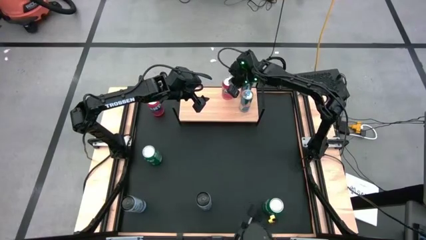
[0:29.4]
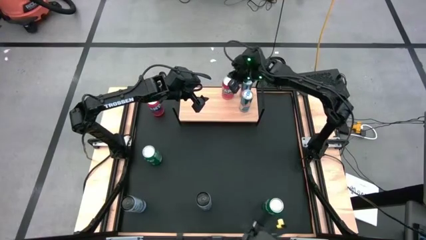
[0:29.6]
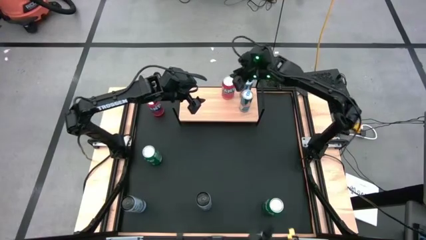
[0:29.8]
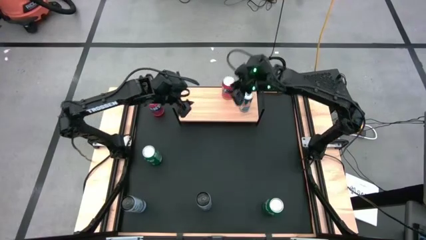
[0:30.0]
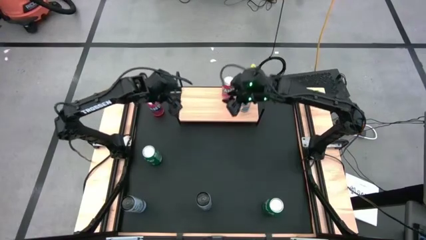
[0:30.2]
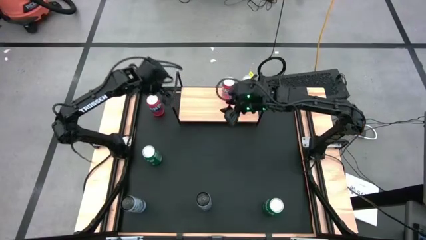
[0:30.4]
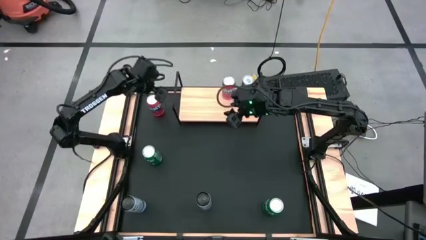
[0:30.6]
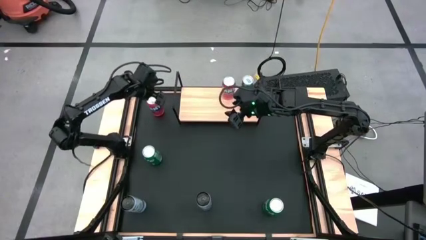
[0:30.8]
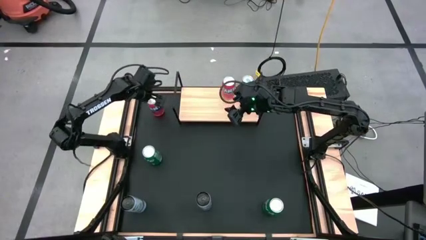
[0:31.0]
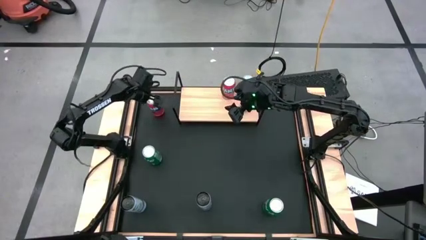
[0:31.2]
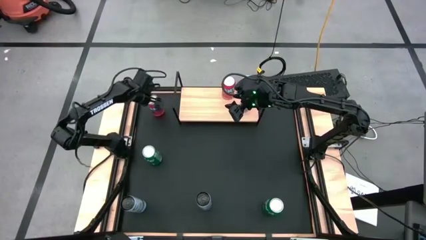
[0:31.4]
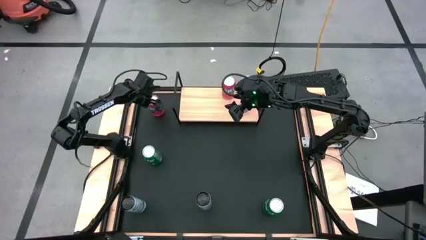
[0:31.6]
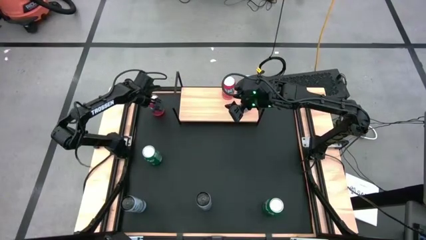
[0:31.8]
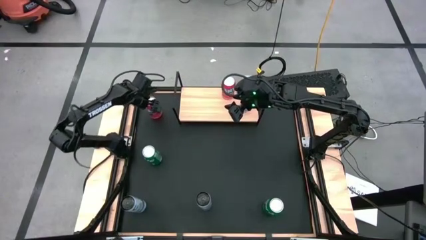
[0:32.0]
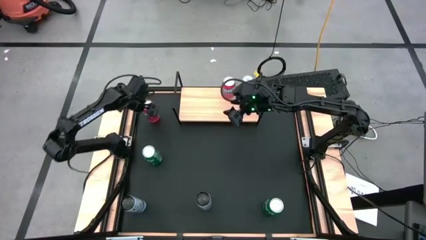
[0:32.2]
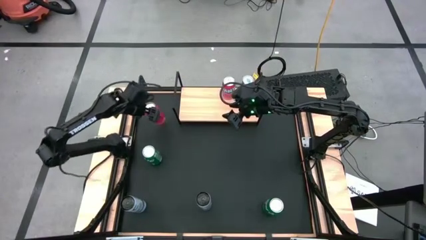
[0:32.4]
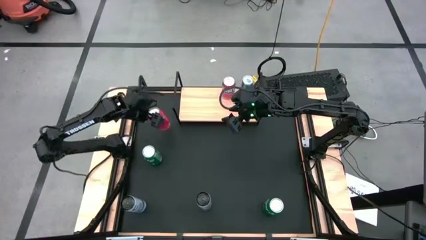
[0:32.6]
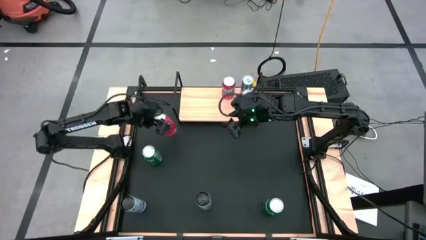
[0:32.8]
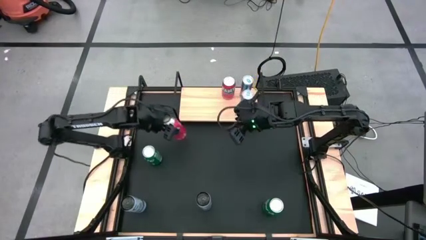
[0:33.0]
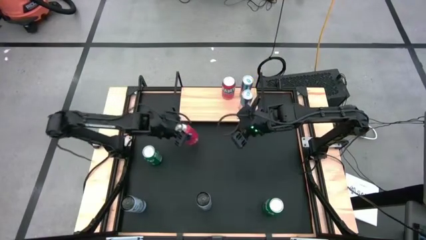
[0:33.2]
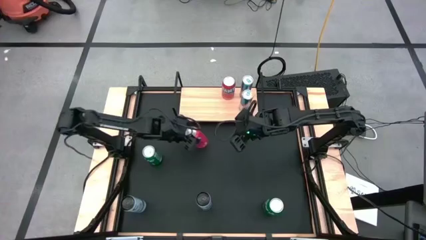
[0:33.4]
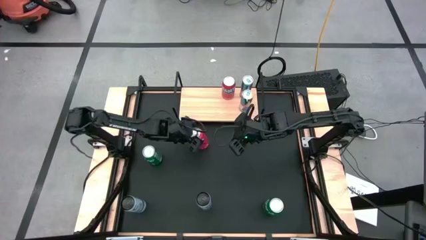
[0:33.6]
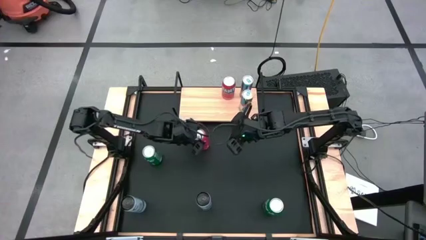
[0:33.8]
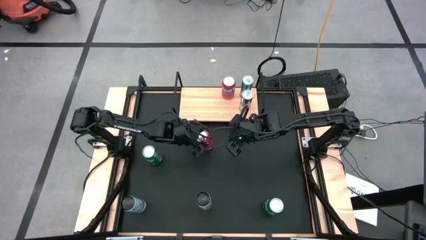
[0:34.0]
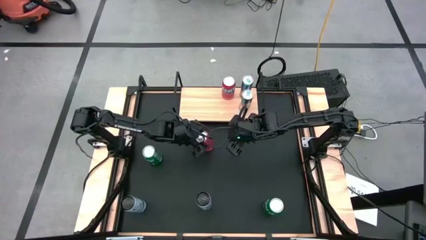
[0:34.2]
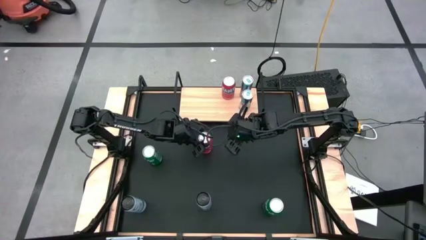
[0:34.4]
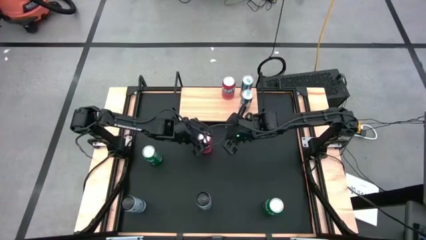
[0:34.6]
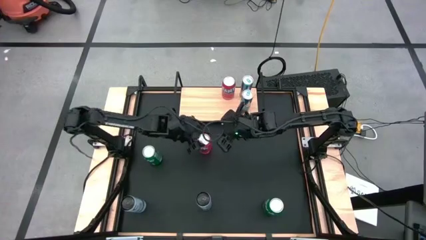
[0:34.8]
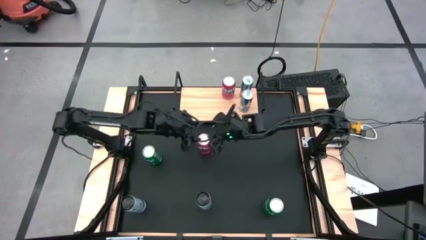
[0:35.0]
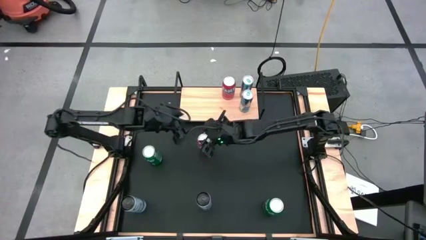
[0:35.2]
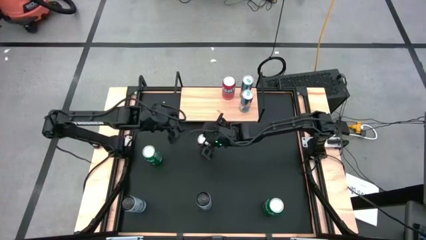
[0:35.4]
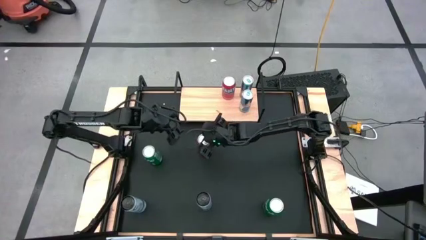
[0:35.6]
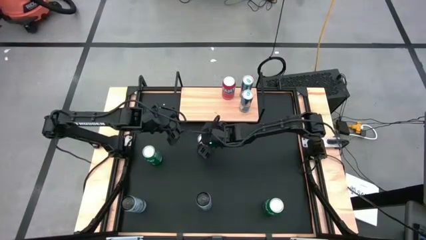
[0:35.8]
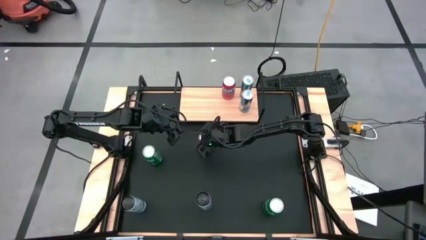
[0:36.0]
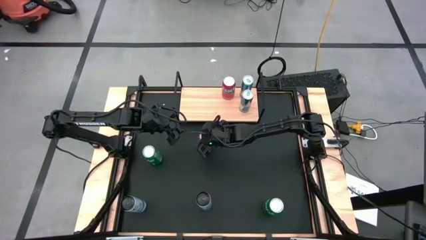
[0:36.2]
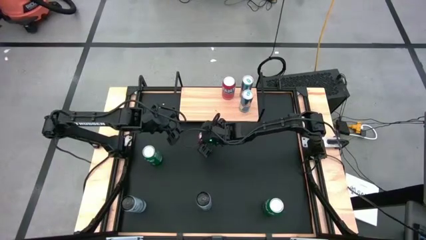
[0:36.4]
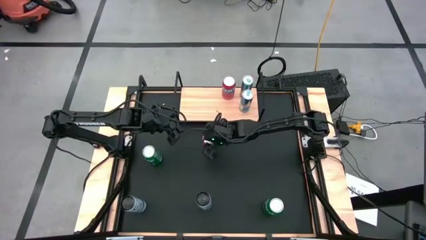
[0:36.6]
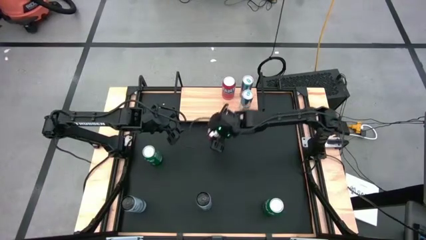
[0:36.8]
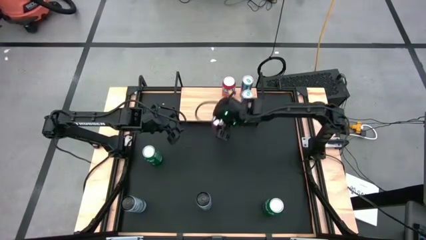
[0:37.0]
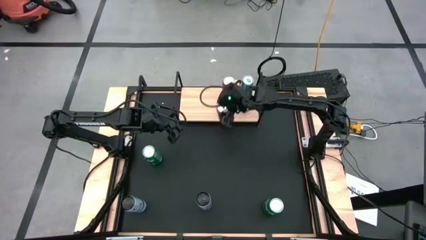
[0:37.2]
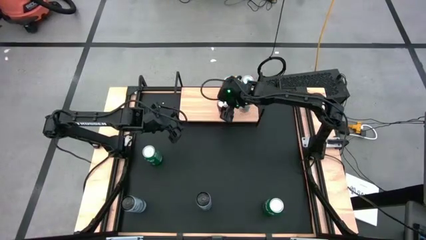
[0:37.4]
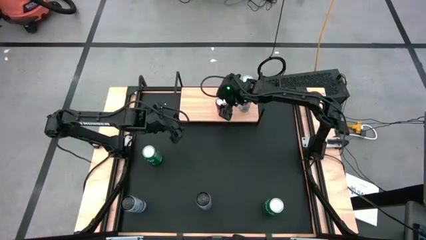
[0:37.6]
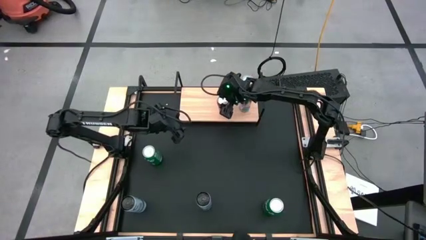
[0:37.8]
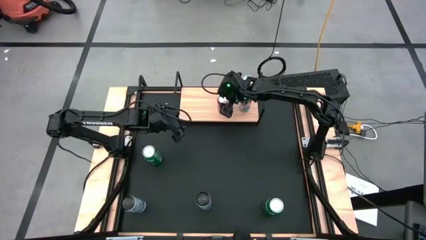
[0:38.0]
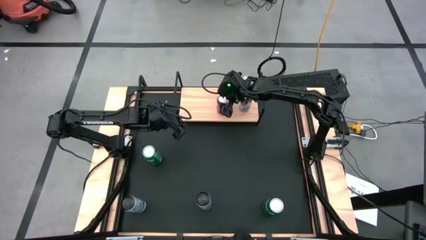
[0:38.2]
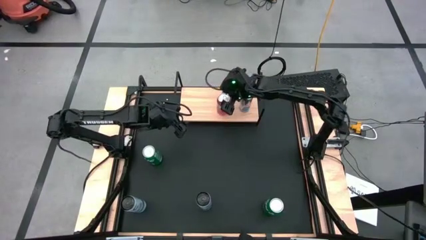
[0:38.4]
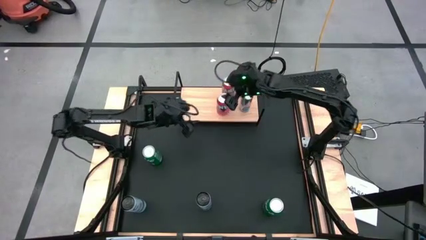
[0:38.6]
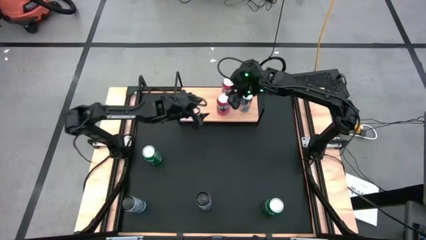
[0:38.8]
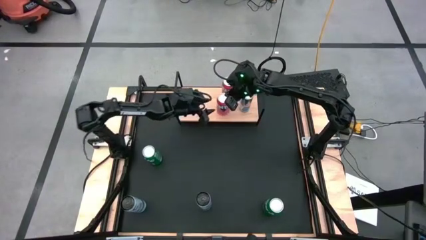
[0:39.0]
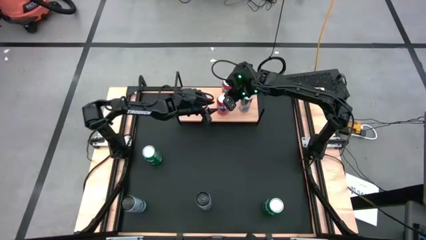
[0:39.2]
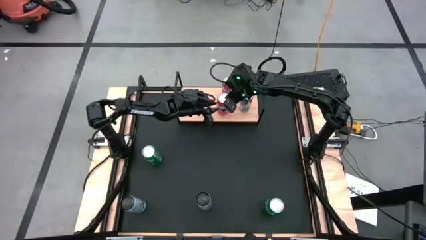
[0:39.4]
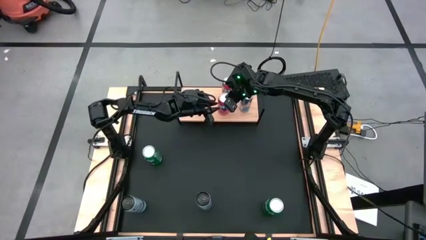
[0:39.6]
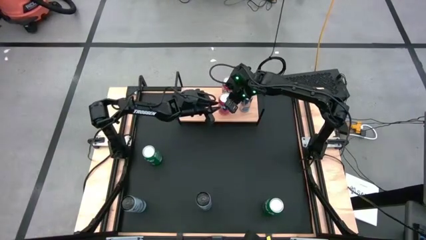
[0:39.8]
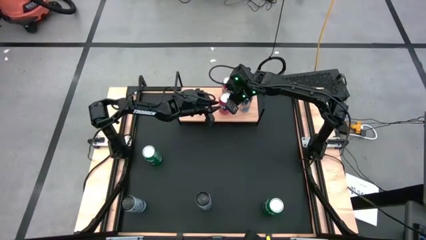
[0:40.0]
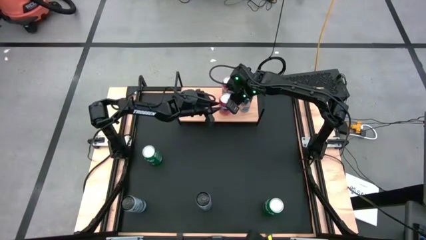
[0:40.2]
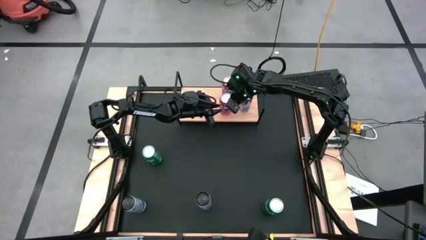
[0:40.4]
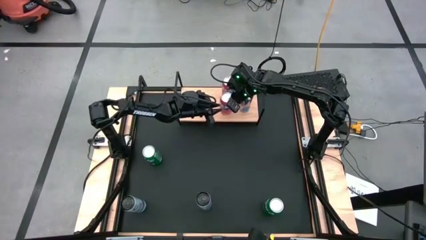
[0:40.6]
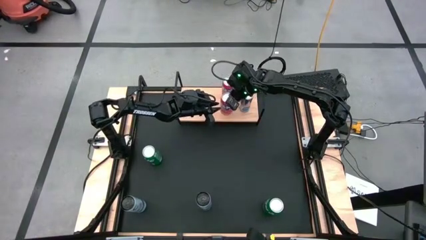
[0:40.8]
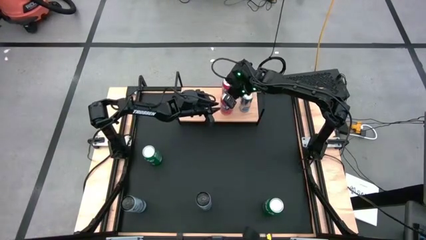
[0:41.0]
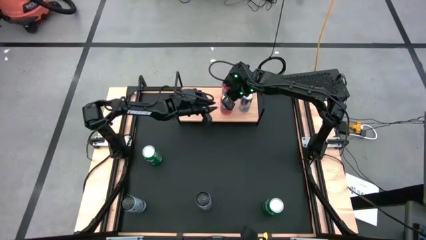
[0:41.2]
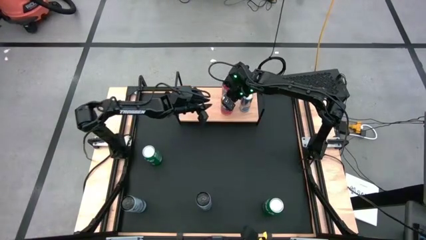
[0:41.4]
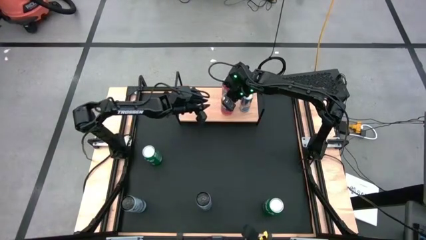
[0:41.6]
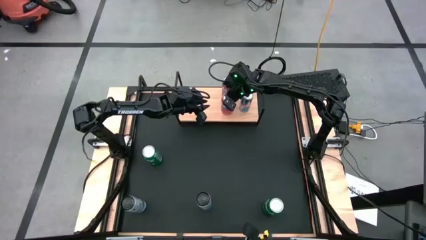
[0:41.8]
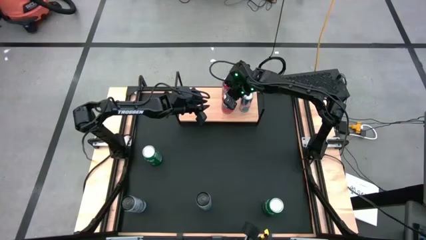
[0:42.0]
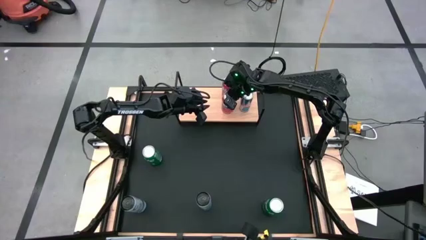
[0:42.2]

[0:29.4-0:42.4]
Task: Place canned beverage on shelf
Put the red soda can on the shelf aligned with the other red soda can
